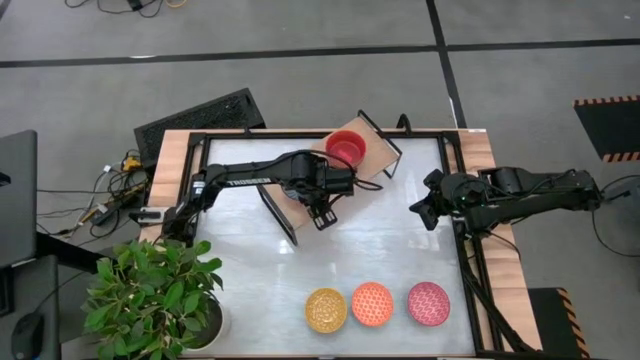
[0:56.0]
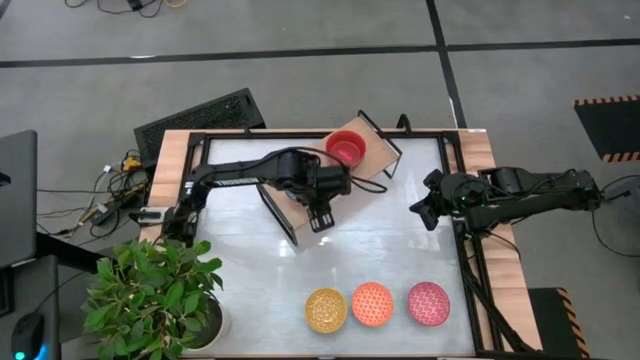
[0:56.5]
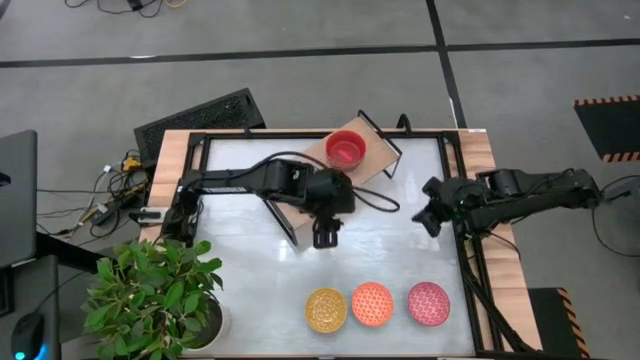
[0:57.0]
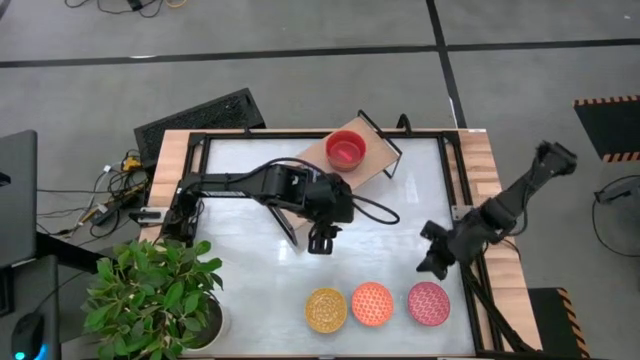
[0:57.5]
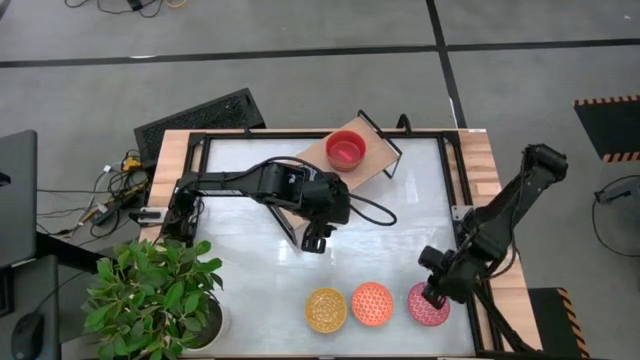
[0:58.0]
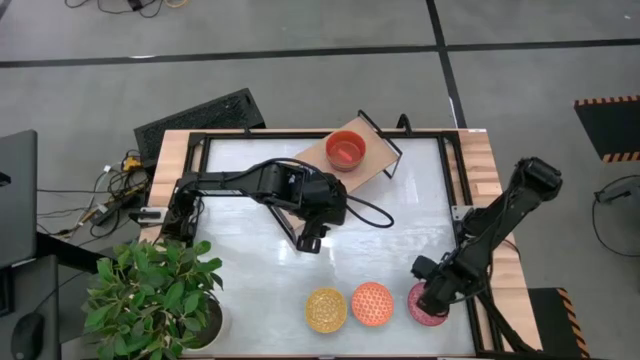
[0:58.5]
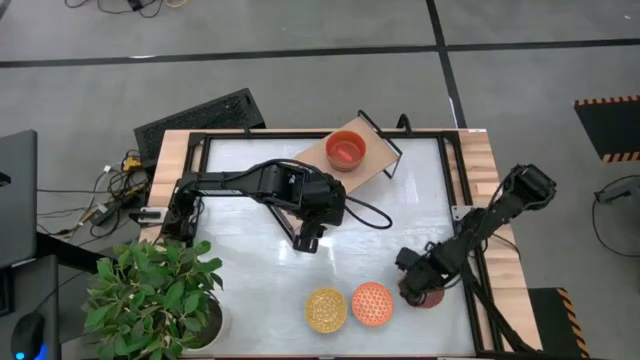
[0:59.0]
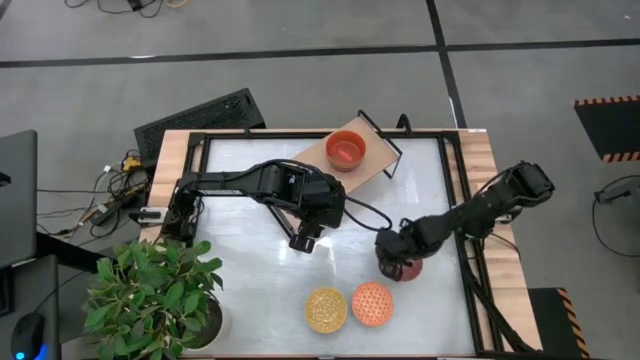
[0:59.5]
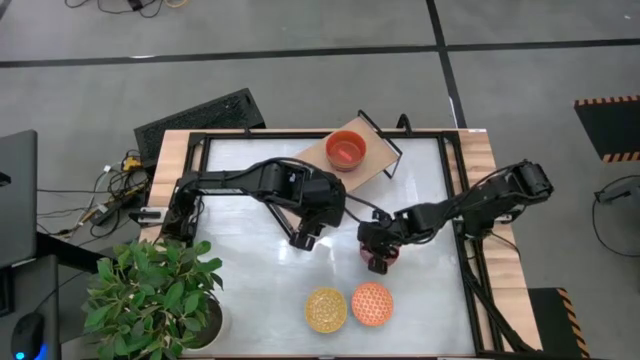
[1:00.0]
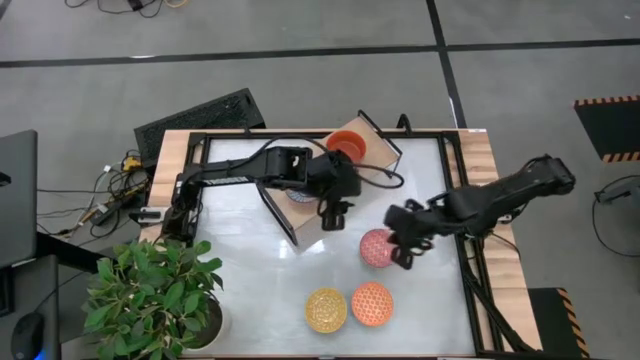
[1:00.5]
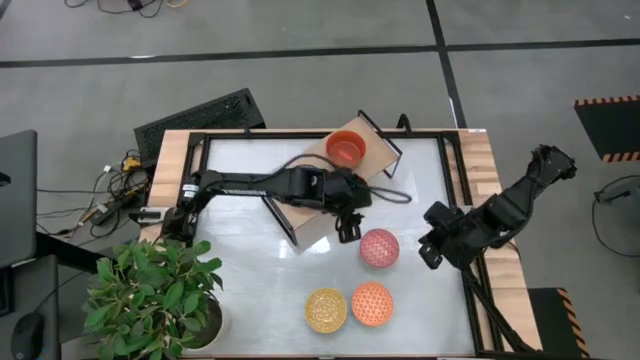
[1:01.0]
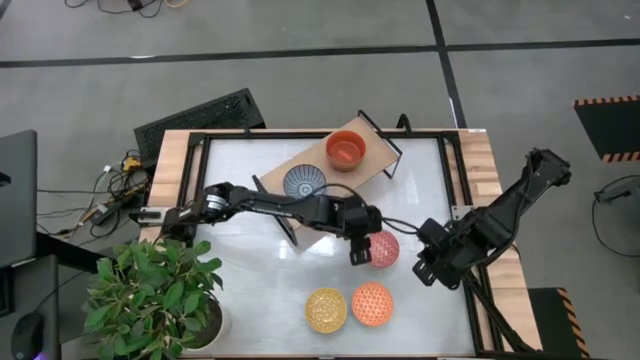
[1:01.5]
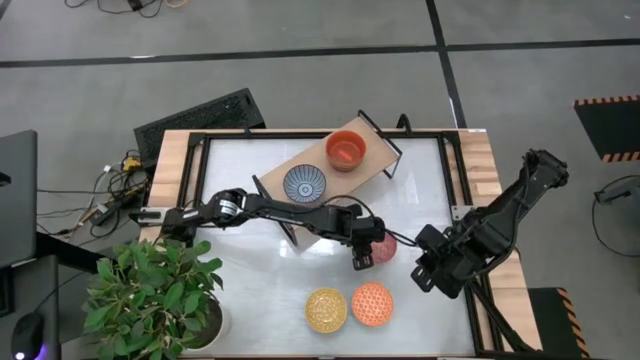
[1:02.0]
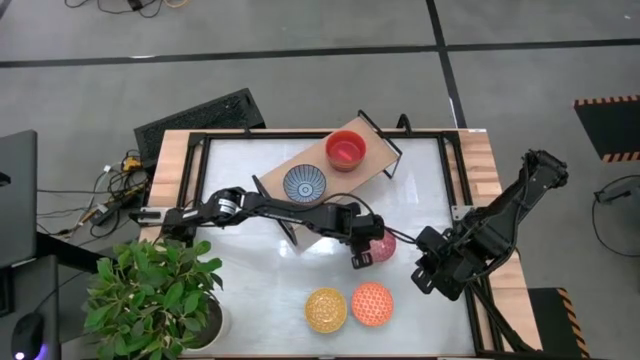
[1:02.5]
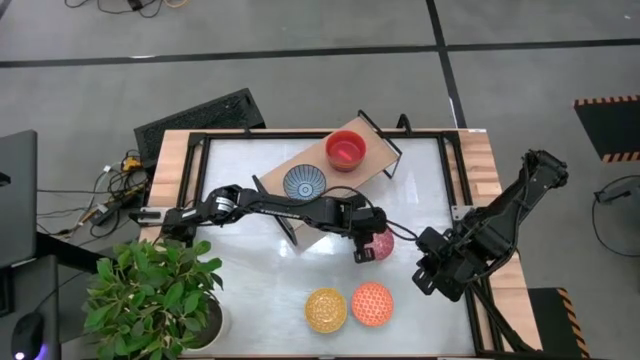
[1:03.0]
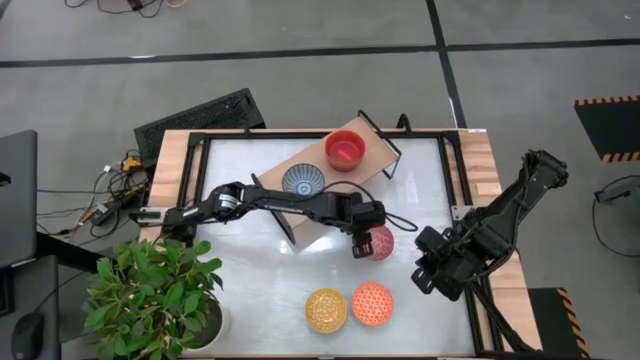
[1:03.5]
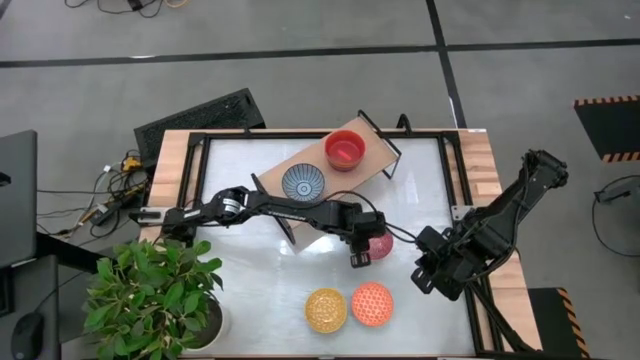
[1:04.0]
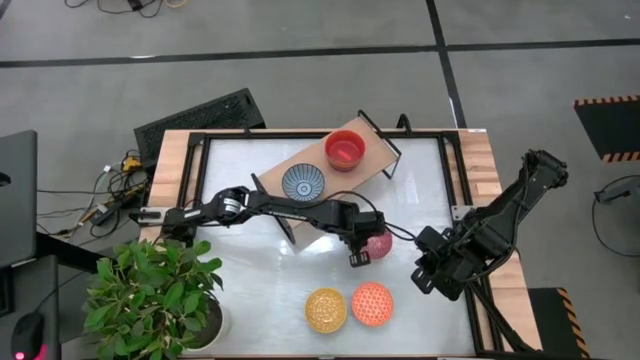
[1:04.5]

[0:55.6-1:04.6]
Task: Place and stack bowls onto a shelf
Stack the patterned red bowl on top of the patterned blue bowl on the shelf

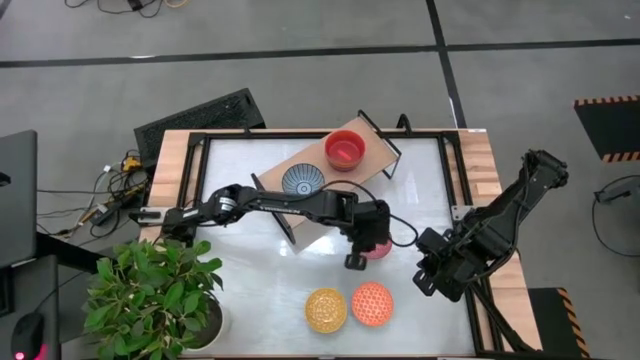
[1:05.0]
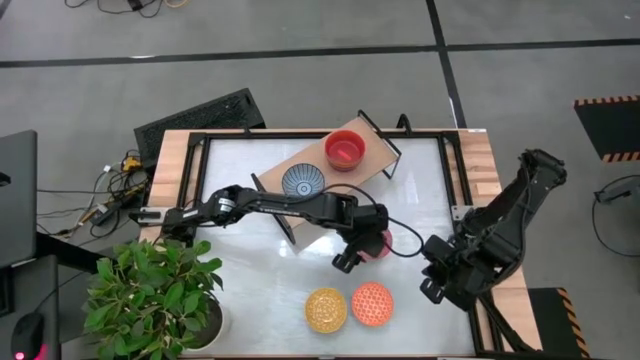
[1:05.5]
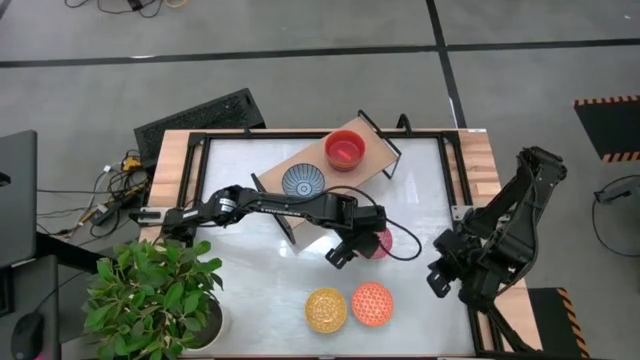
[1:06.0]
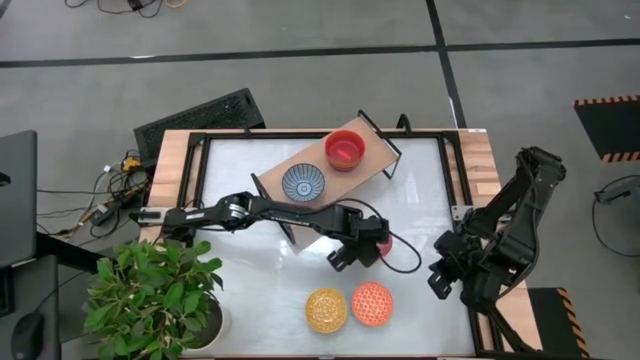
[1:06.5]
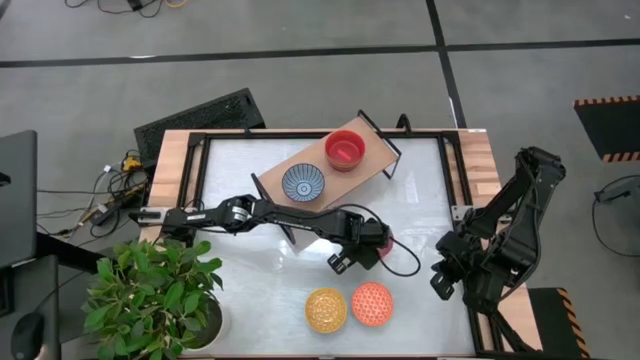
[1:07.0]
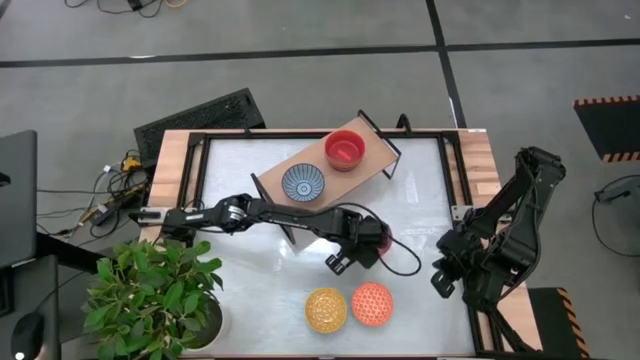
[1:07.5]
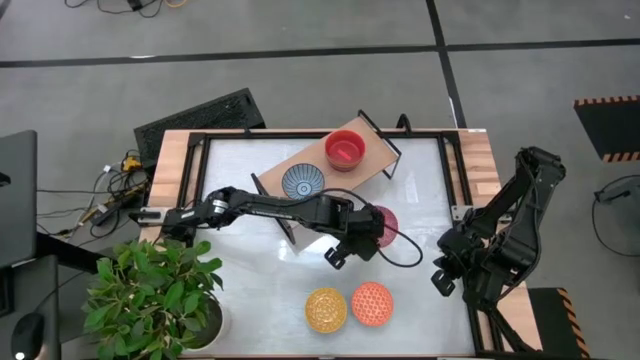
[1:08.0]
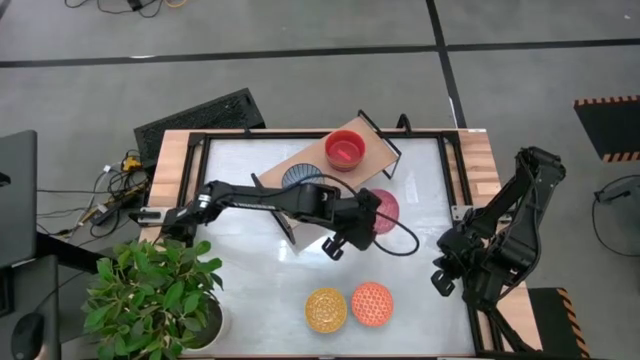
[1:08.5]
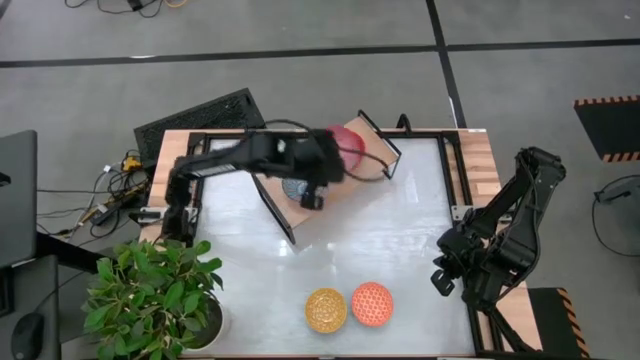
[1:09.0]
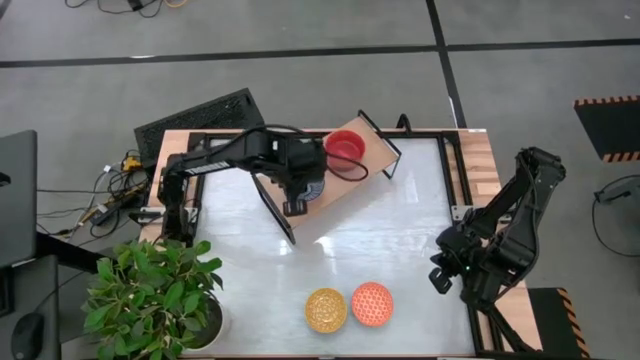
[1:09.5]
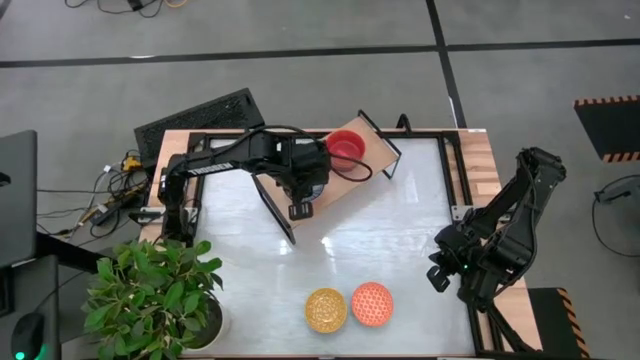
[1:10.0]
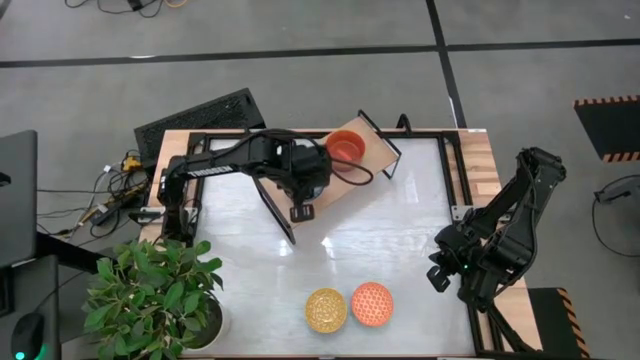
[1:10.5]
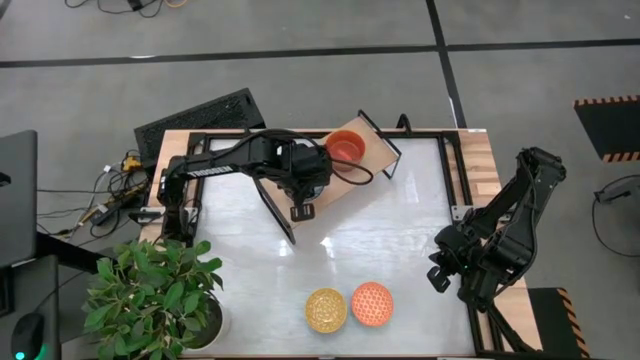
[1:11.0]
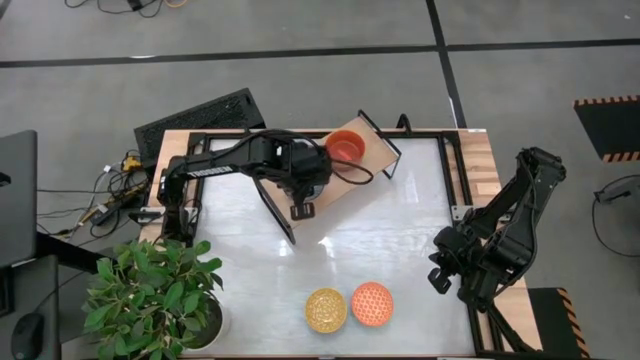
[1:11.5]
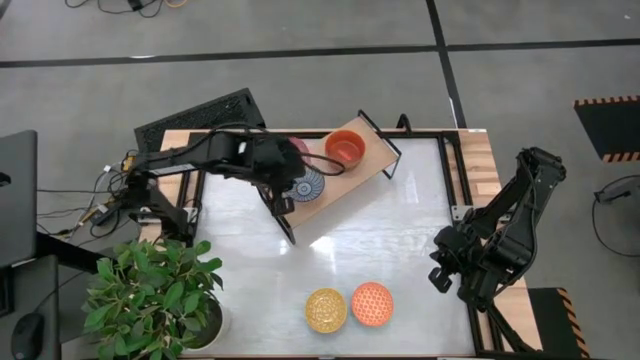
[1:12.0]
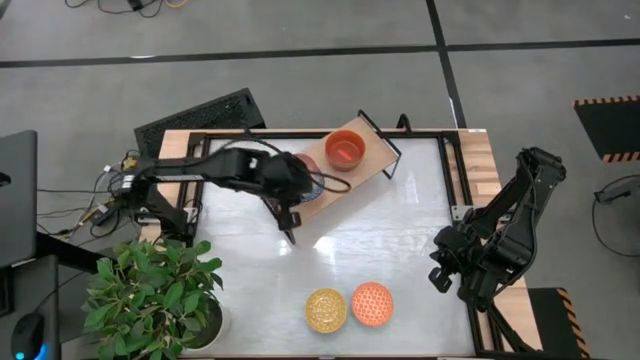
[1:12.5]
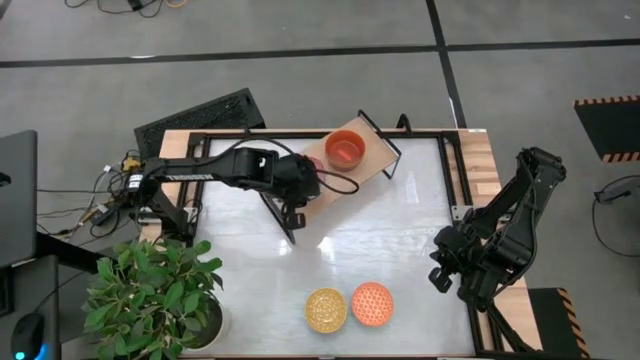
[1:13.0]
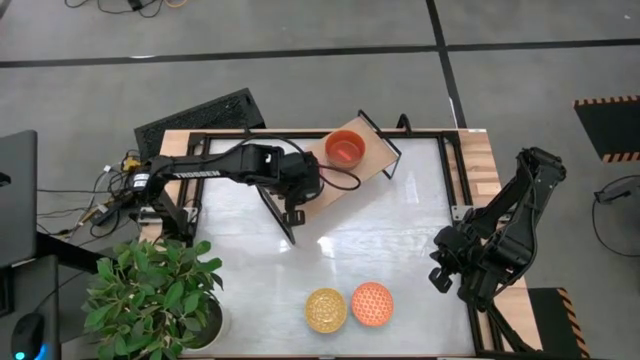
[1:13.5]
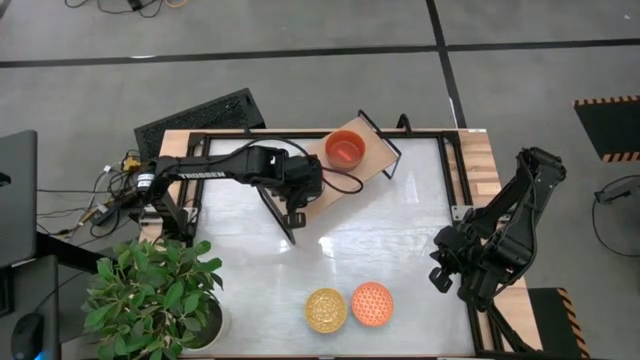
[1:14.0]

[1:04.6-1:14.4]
Stack the patterned red bowl on top of the patterned blue bowl on the shelf

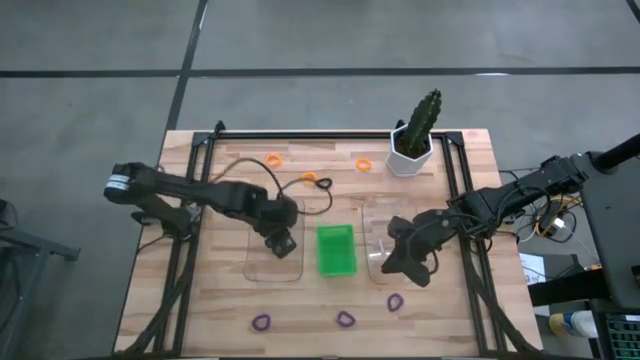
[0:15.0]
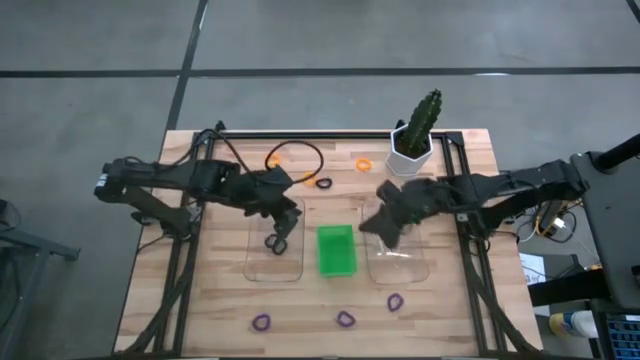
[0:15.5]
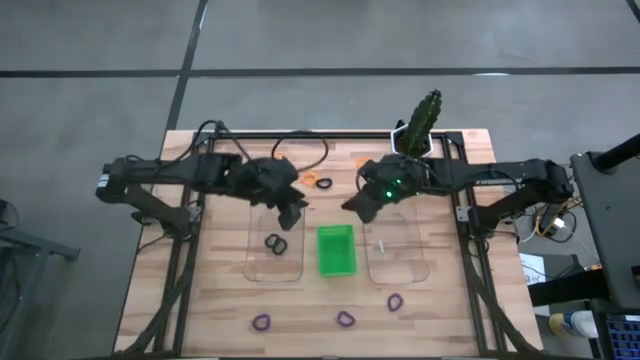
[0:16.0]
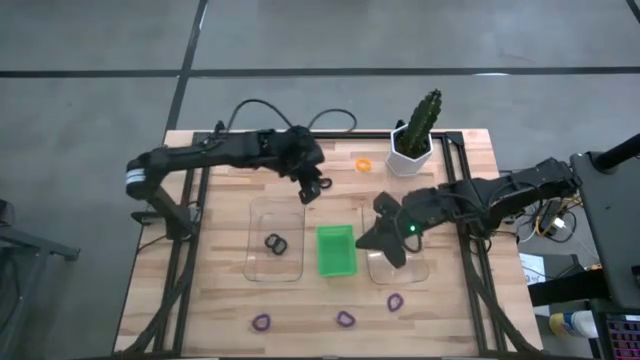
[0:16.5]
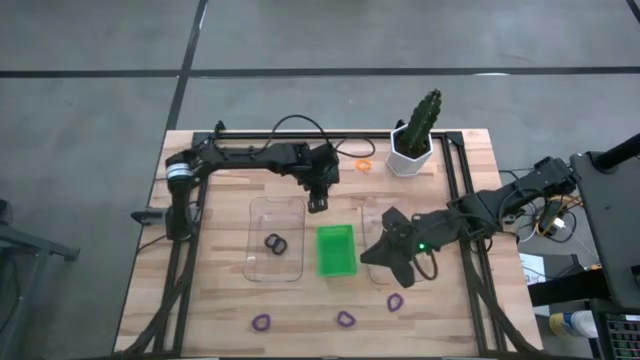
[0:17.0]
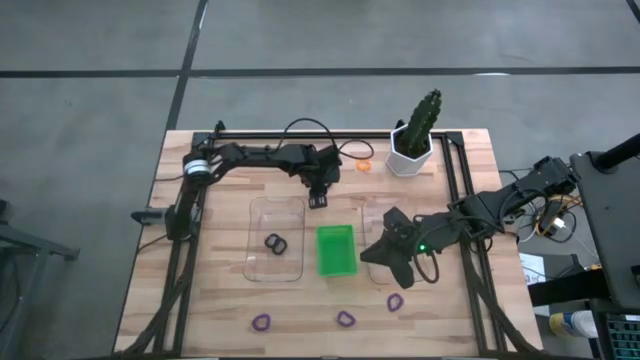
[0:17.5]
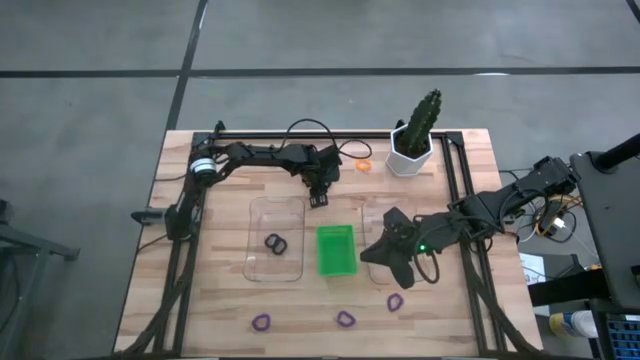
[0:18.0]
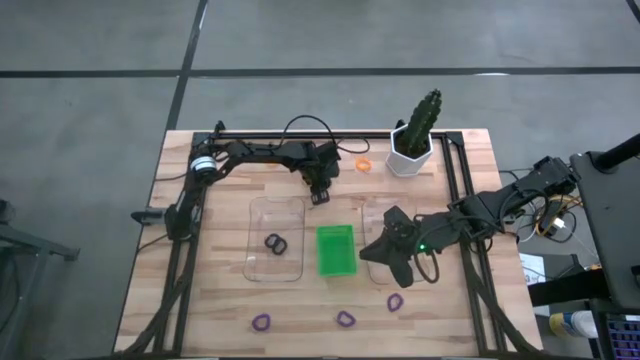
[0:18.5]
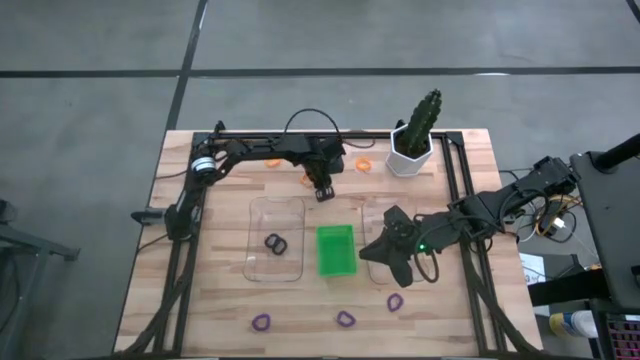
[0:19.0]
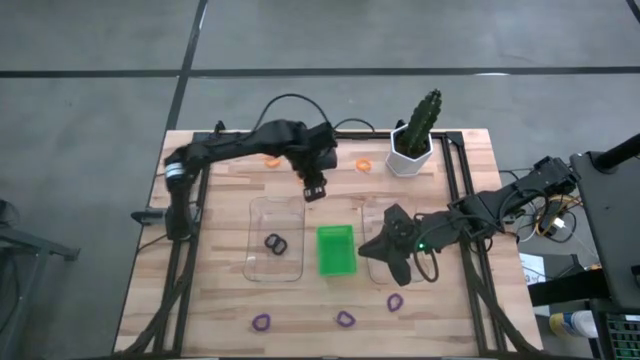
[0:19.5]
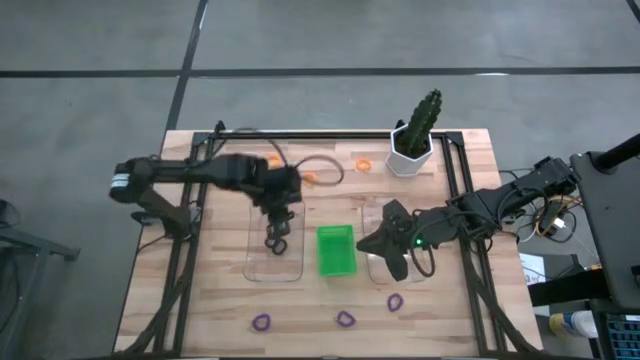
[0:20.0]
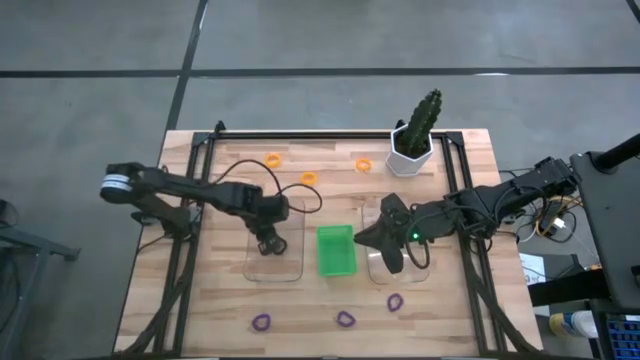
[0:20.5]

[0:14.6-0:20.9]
Task: Sort spring keychains
Put the black spring keychain into the left transparent bin
